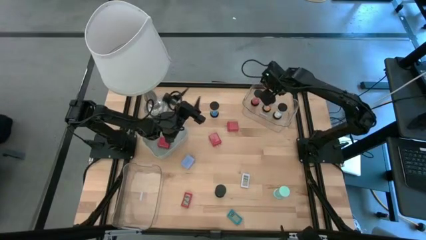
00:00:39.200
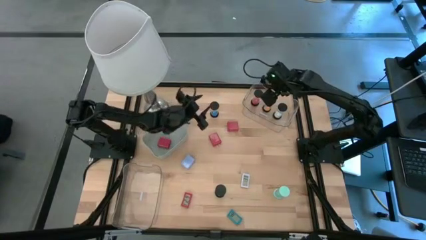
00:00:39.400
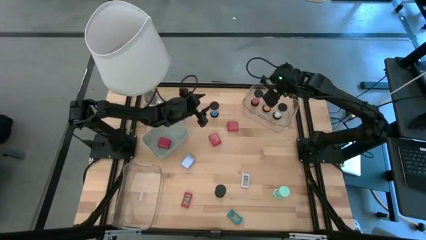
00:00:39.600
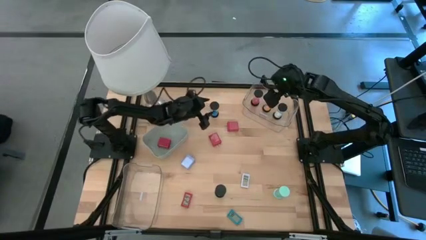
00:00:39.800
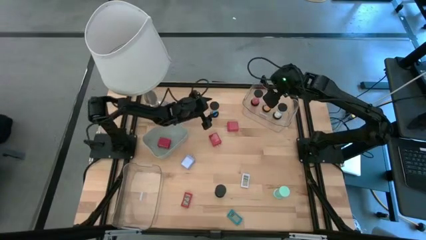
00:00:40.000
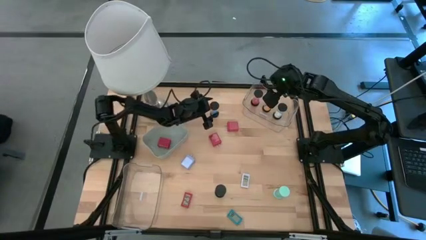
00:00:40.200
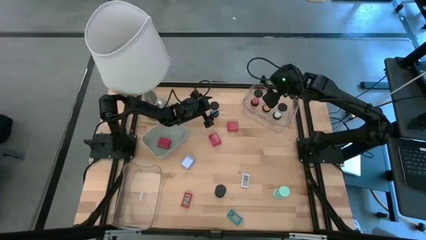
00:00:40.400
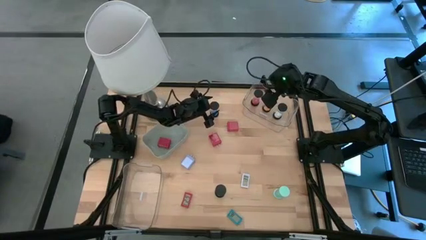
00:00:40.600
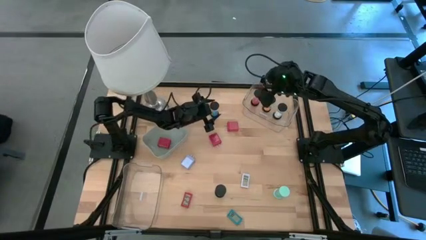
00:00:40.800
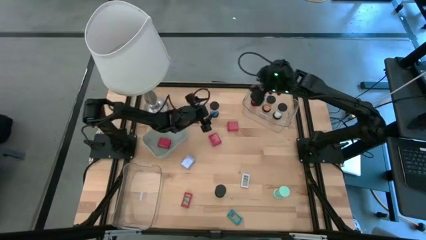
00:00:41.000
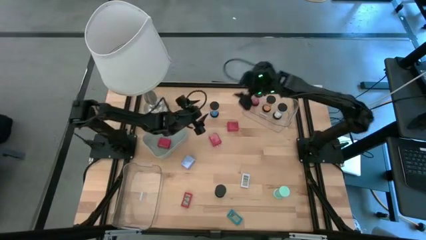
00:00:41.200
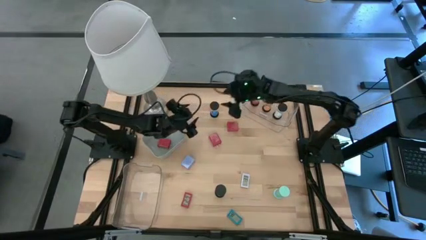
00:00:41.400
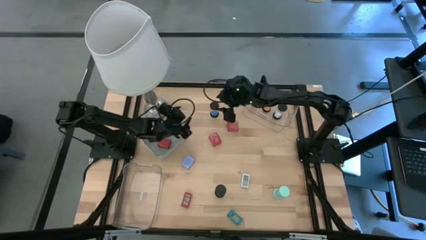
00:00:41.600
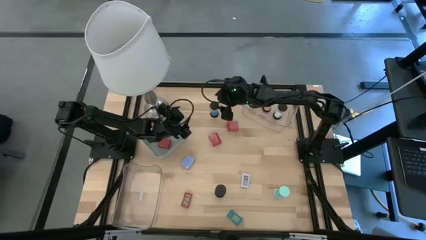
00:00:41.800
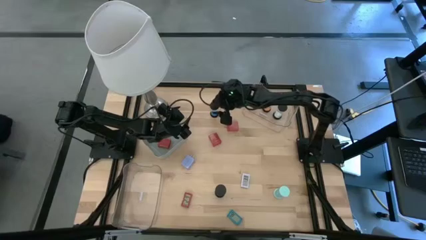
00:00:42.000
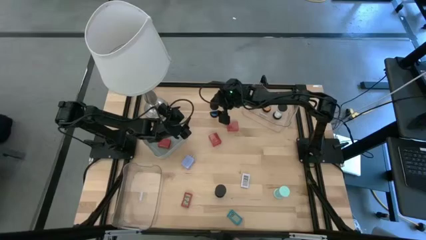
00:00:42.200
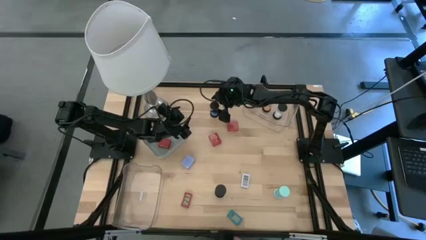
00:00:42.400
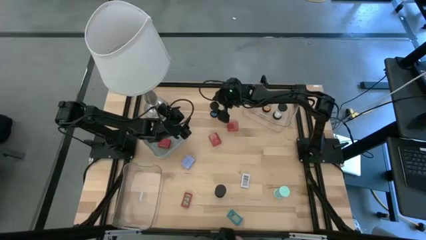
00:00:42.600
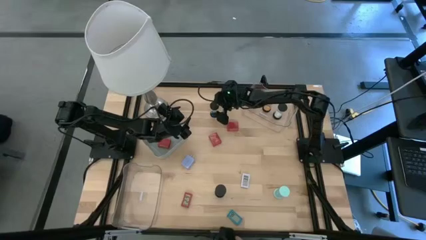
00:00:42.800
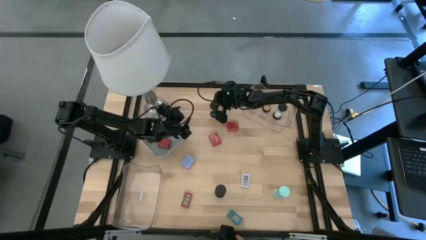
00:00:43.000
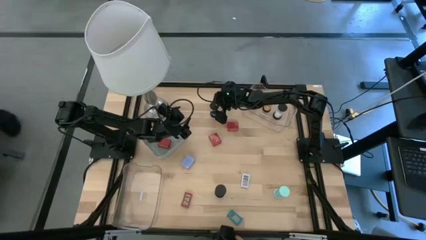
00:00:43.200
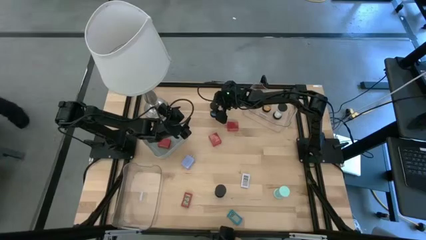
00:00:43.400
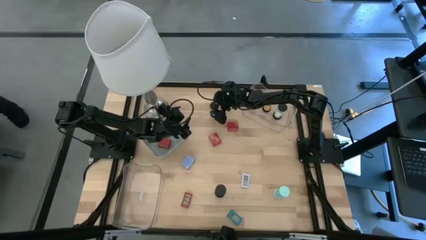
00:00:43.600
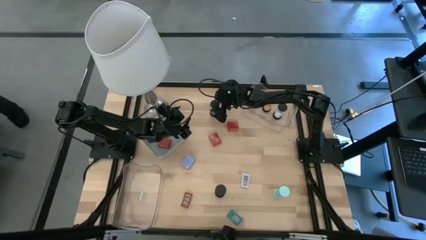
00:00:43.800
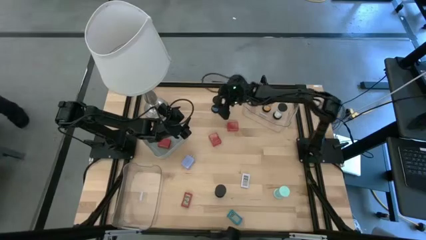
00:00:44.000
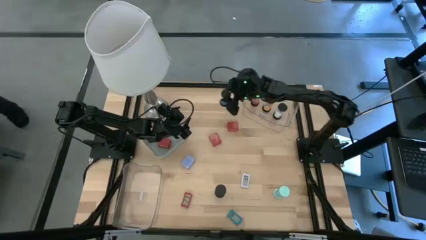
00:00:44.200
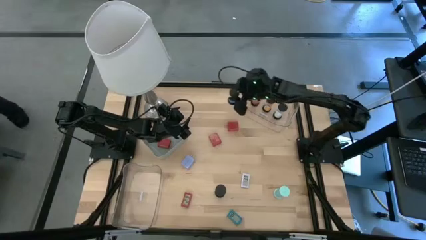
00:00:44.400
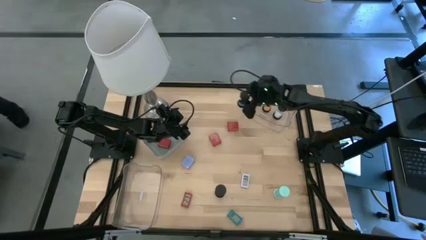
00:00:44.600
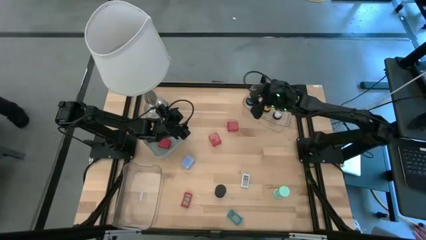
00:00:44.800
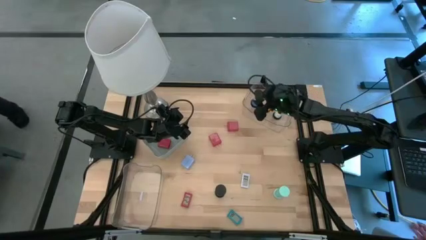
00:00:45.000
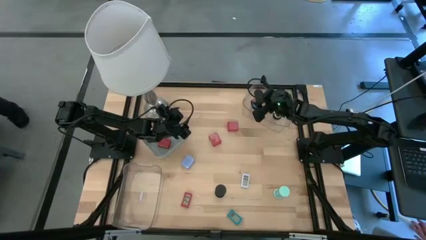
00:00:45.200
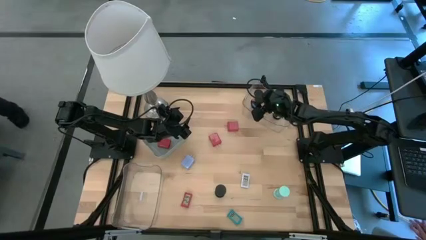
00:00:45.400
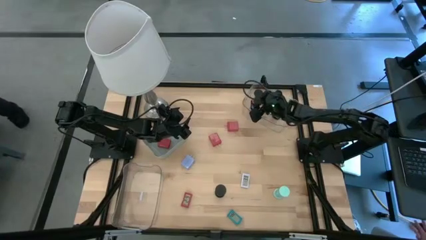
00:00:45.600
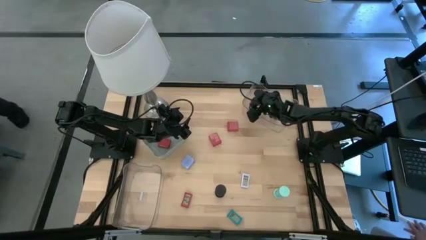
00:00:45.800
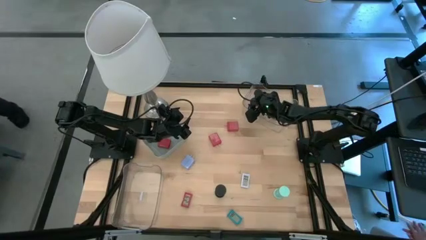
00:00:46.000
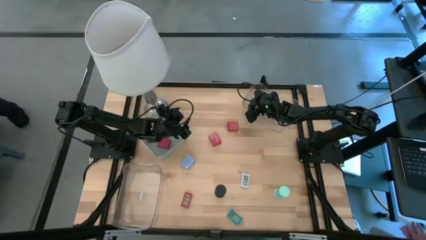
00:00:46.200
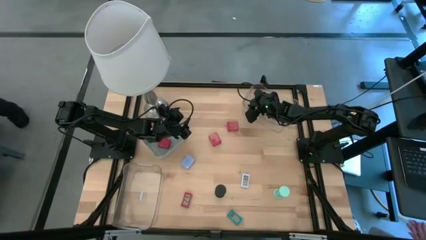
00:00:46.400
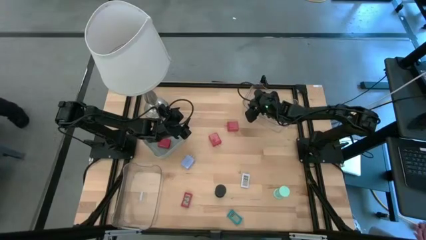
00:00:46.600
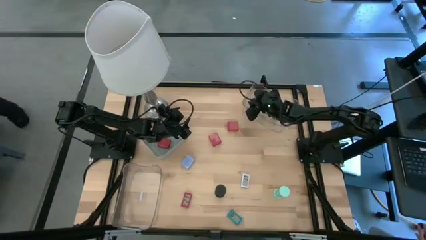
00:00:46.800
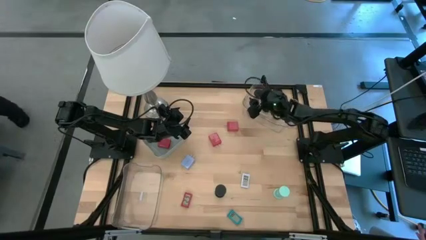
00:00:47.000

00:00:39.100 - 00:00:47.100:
Task: Pick & Place Office items
Put the top blue hourglass into the top transparent bin

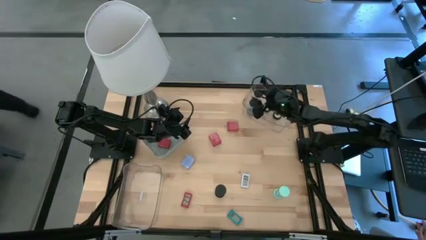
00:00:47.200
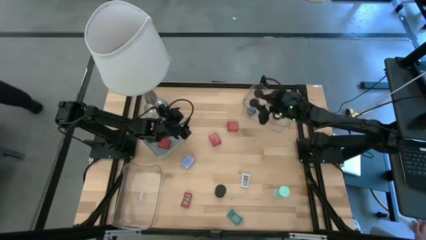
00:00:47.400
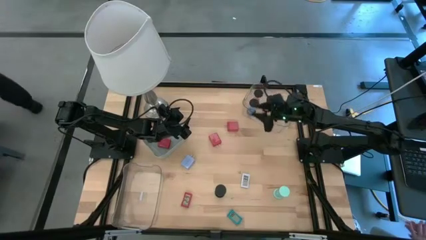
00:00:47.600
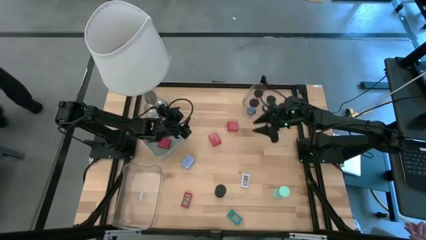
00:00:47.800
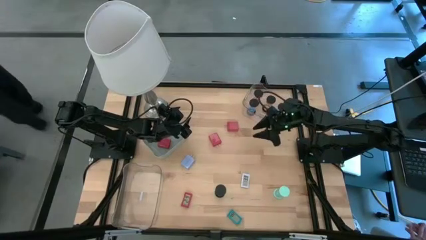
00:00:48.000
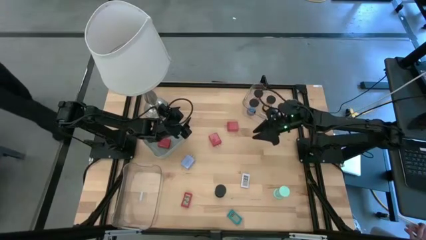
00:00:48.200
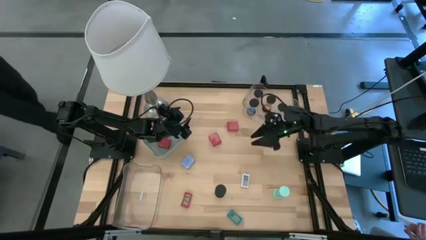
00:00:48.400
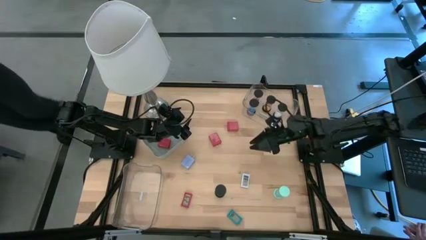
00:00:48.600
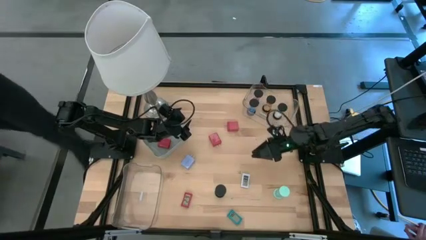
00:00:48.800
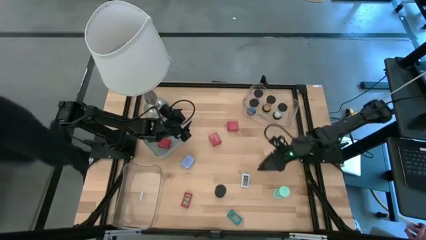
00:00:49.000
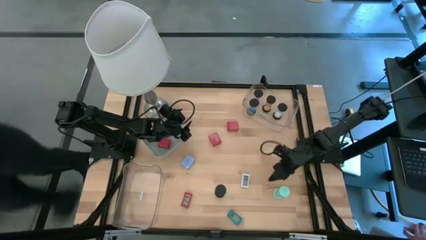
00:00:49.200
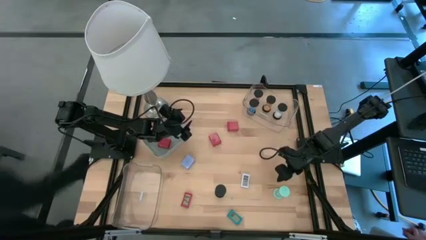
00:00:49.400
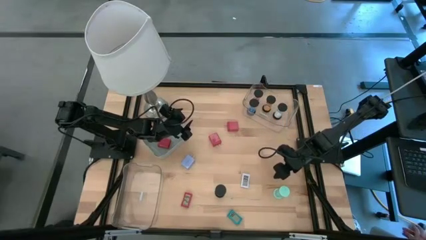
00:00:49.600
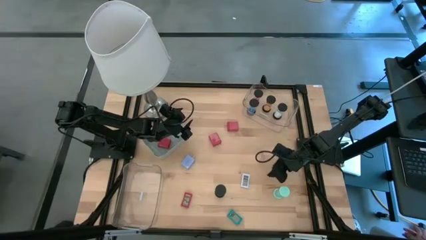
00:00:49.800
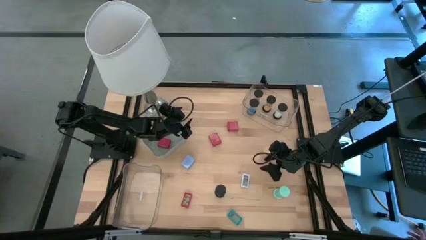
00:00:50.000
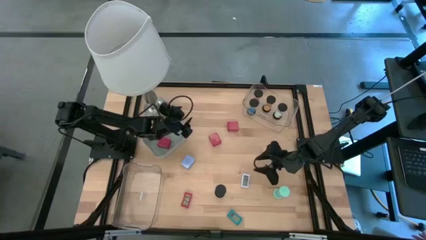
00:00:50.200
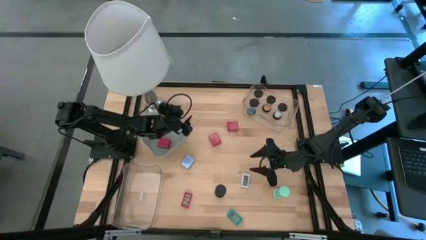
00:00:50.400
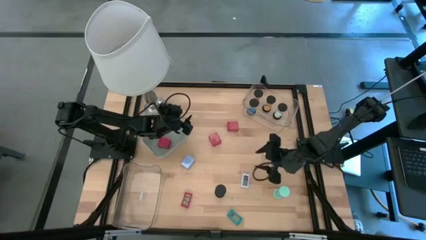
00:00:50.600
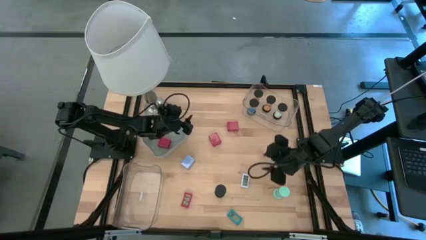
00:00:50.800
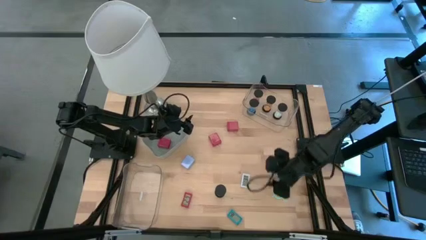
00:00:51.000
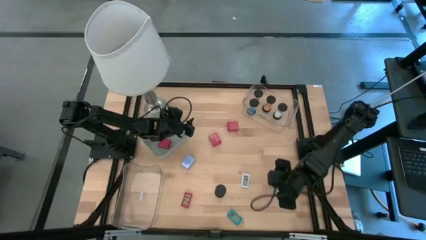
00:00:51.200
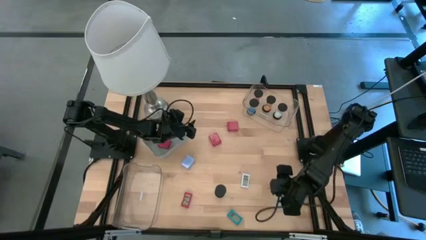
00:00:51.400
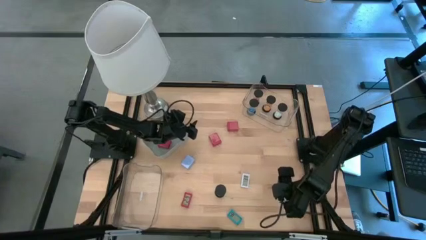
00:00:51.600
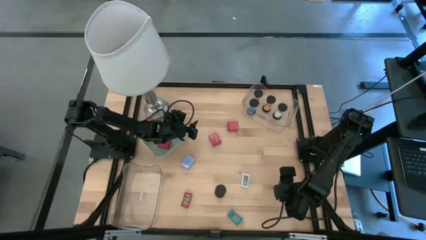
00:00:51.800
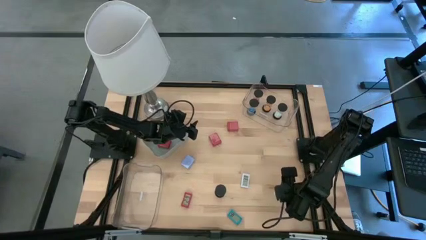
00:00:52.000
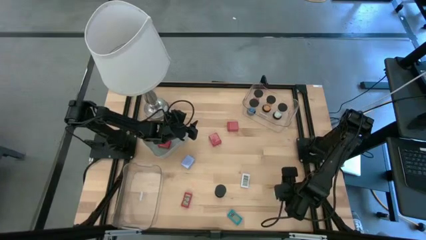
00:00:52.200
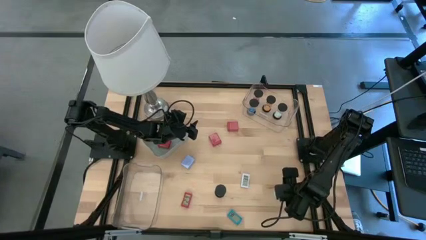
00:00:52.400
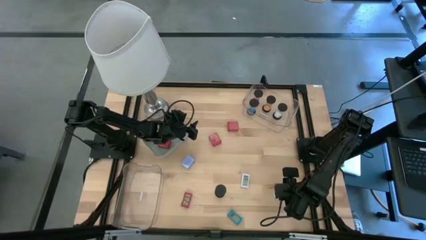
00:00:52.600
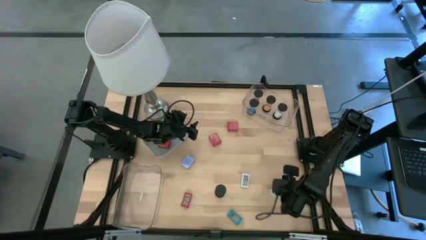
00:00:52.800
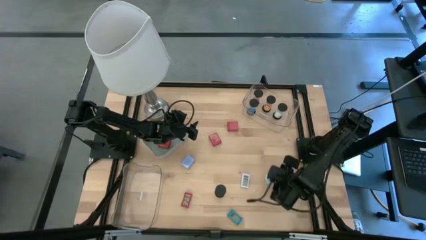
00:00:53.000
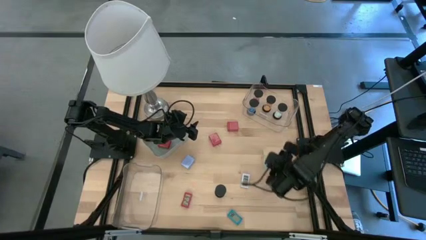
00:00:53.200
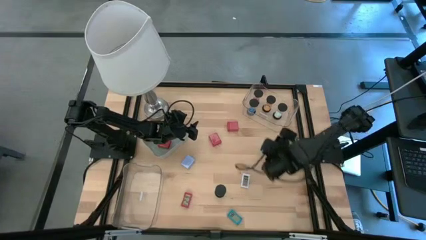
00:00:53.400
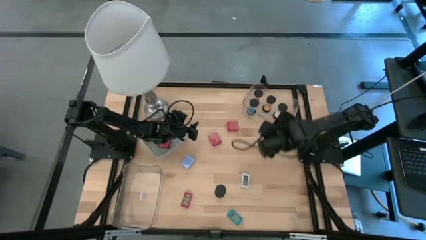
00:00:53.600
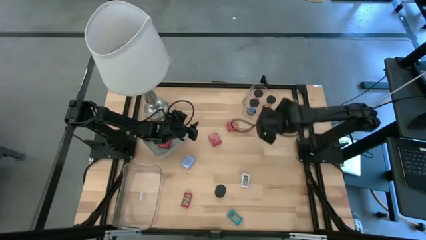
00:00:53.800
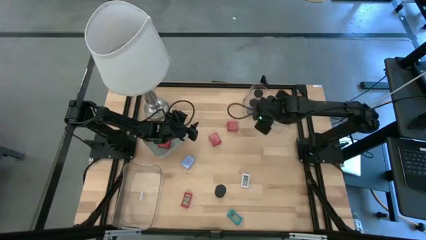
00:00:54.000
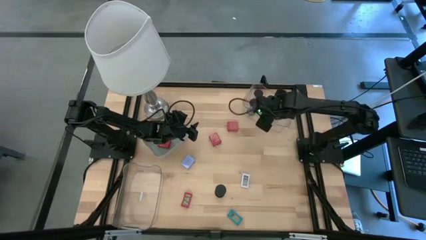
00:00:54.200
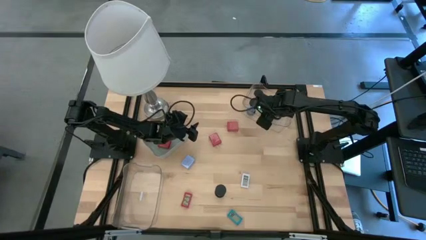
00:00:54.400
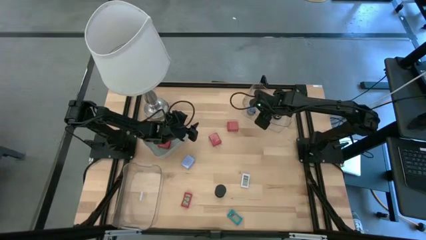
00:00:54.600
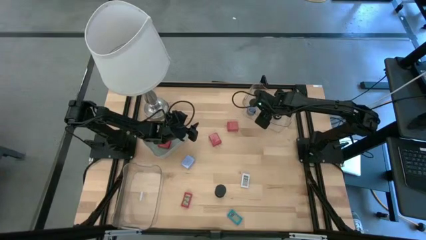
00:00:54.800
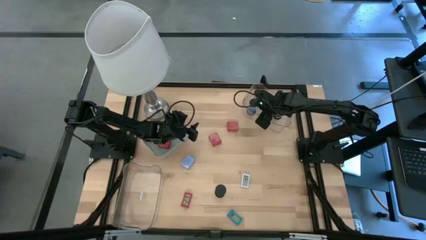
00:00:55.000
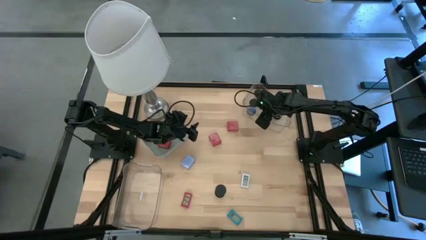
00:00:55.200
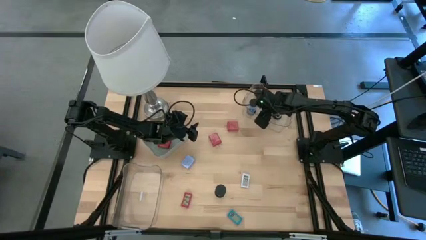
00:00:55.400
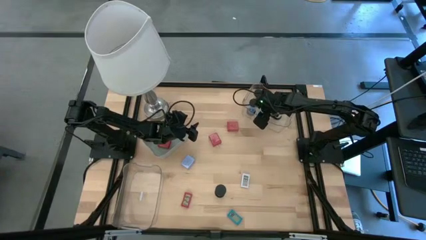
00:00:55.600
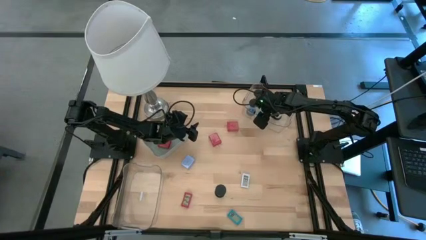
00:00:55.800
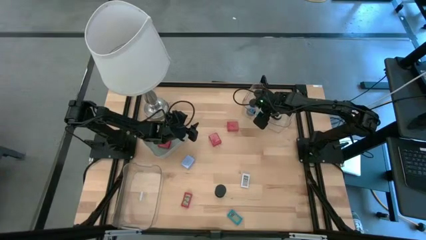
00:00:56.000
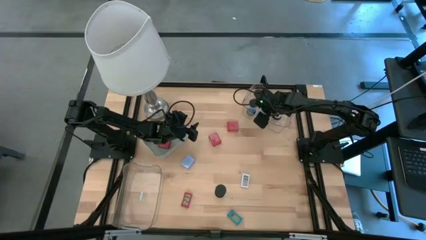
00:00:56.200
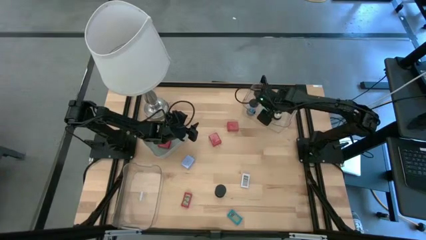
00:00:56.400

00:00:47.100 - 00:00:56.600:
Put the light blue hourglass into the top transparent bin
